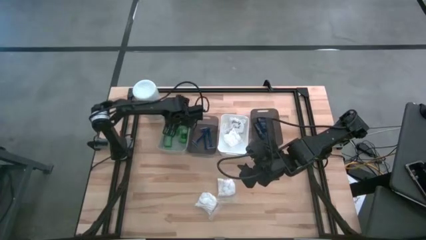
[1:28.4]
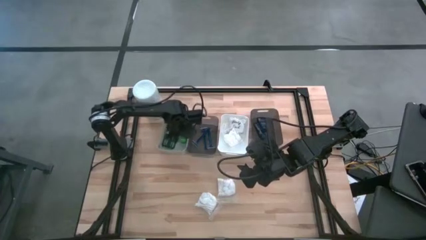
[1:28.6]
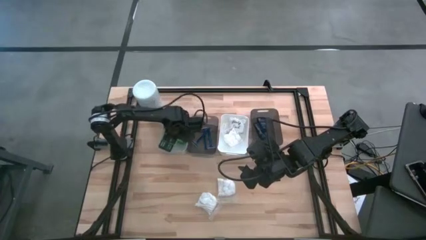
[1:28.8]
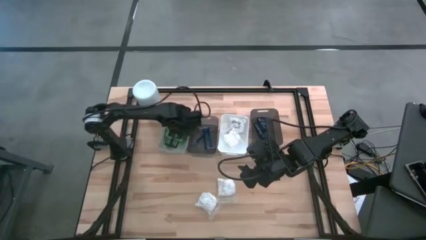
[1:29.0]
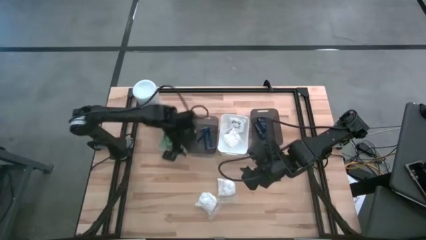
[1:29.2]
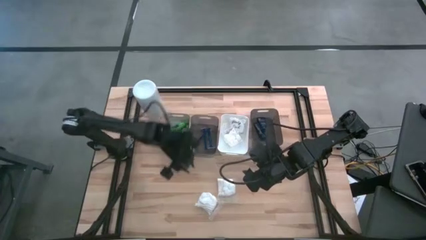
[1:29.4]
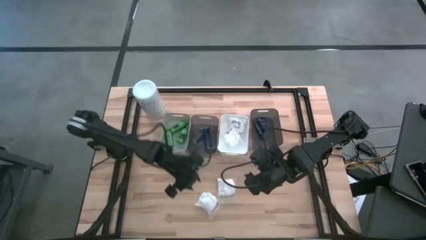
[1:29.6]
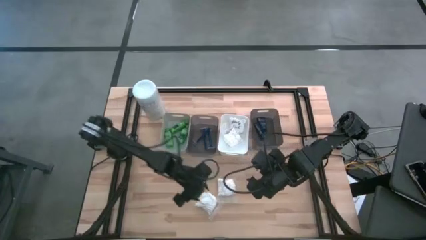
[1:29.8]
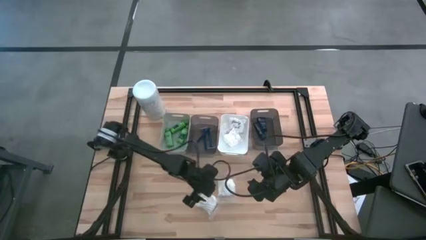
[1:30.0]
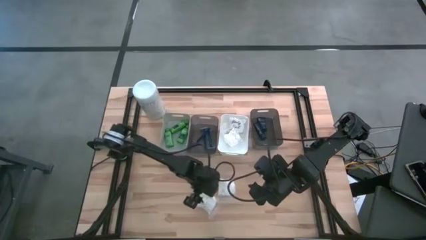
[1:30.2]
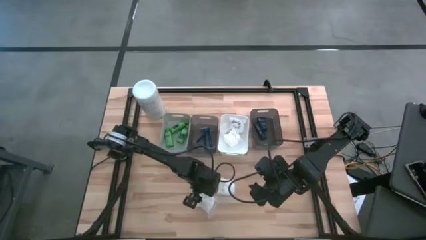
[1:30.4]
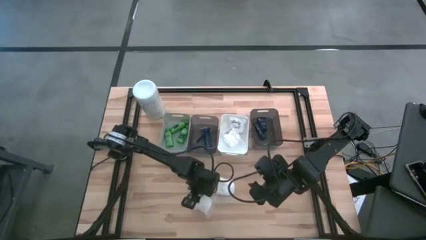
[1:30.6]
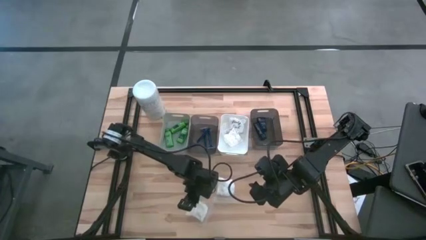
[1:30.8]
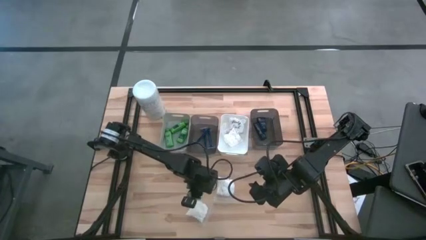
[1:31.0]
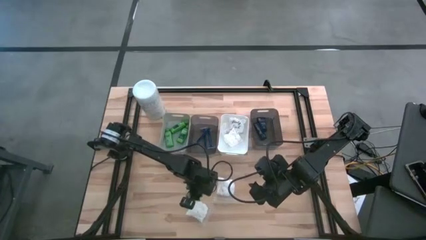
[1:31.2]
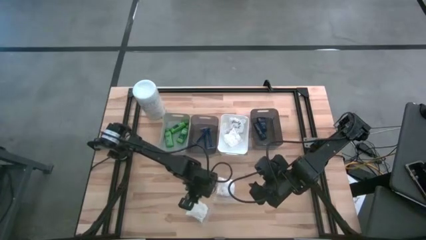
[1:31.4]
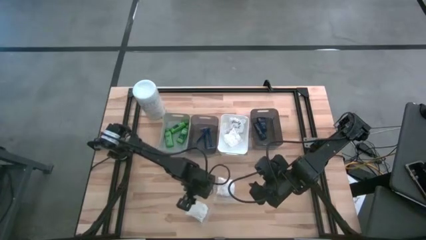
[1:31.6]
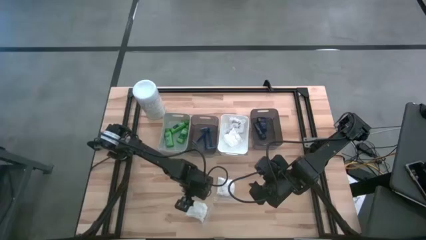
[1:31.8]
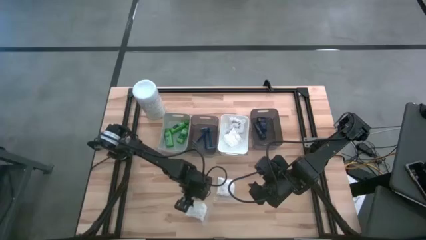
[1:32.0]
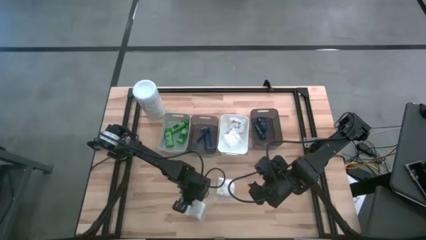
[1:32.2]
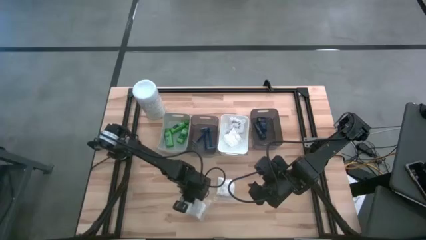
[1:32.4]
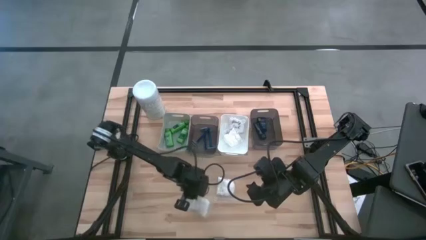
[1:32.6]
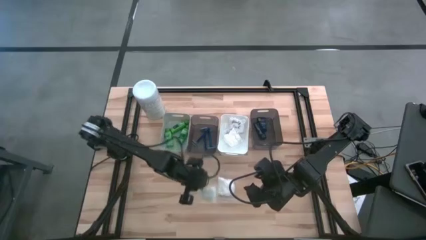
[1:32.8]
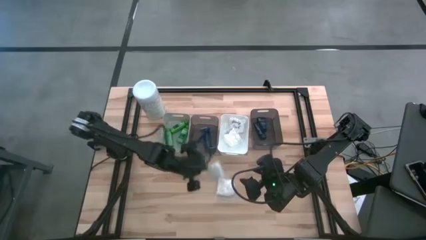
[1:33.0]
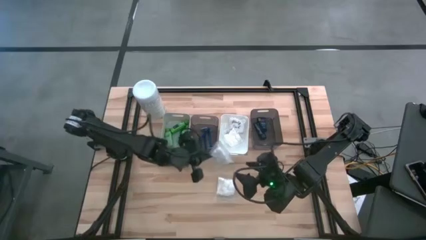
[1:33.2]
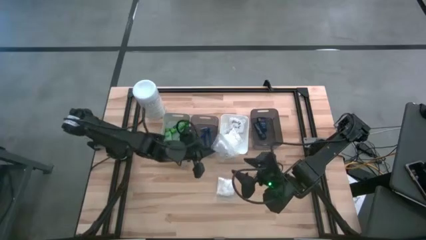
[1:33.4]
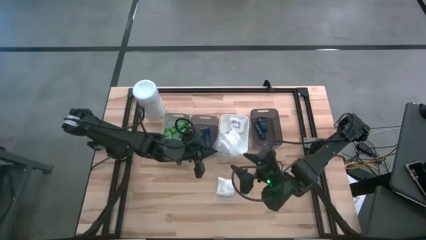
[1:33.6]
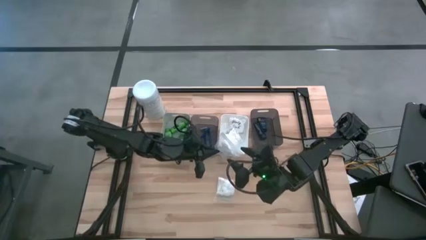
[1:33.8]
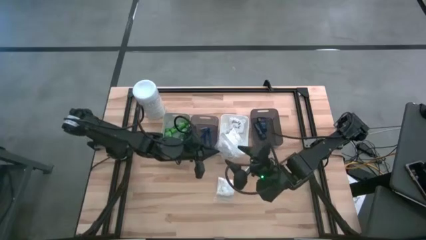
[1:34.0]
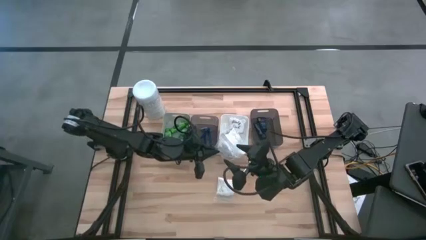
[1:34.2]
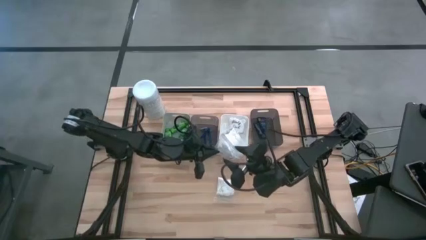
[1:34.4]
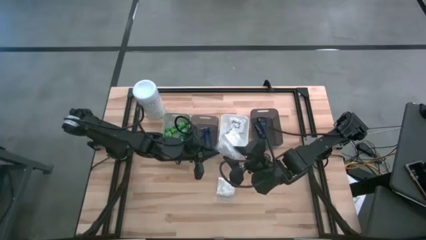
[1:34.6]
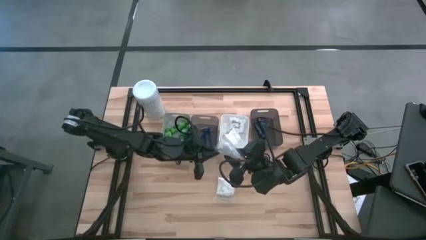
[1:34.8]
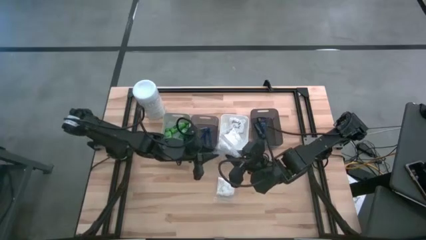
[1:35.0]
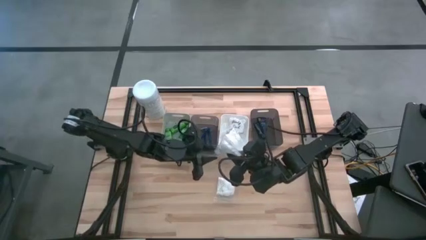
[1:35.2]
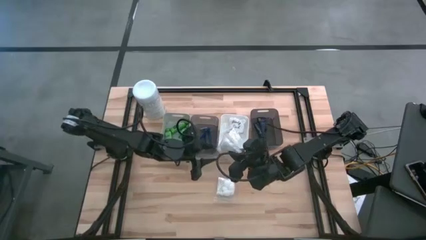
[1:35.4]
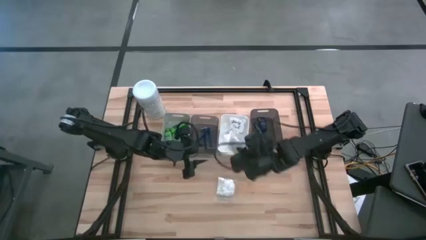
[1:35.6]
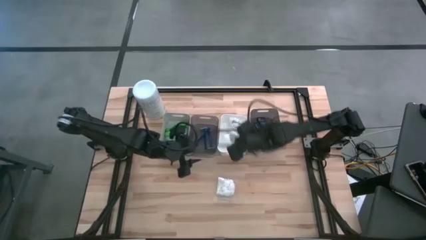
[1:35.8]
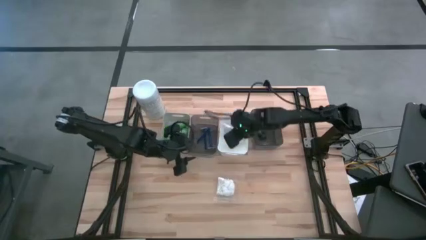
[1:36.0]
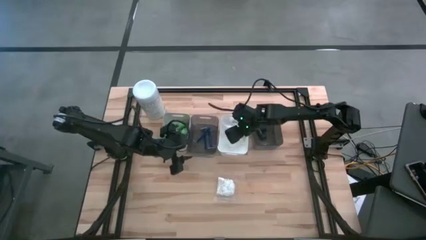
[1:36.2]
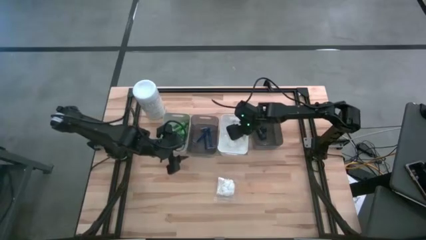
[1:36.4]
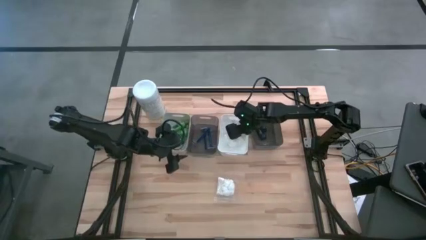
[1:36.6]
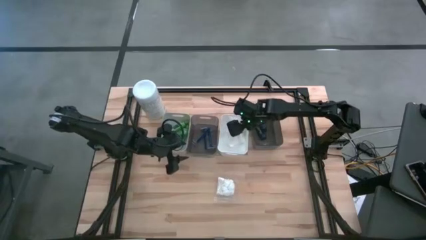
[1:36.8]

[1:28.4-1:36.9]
Task: Pick & Place Travel size toiletries
Put the white cotton pack into the white bin

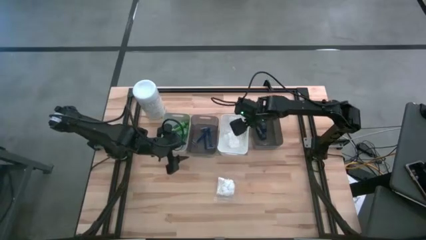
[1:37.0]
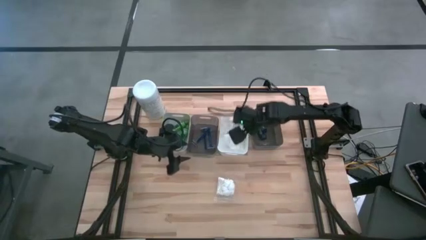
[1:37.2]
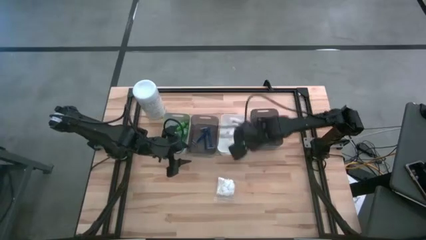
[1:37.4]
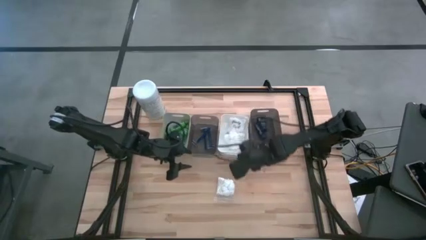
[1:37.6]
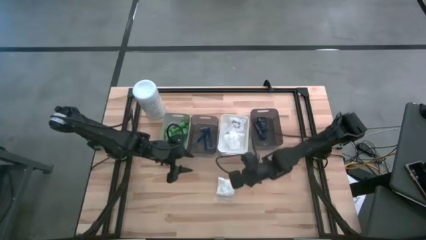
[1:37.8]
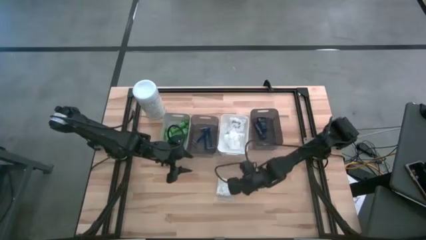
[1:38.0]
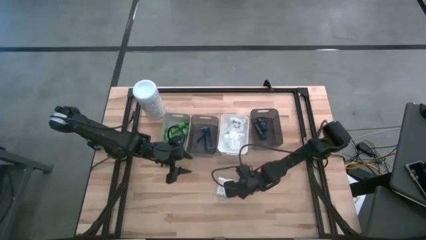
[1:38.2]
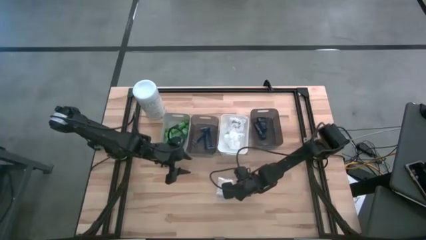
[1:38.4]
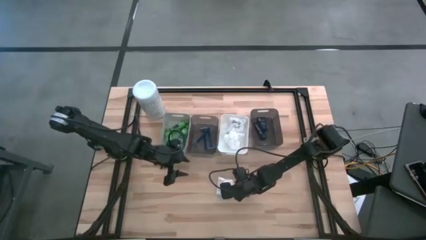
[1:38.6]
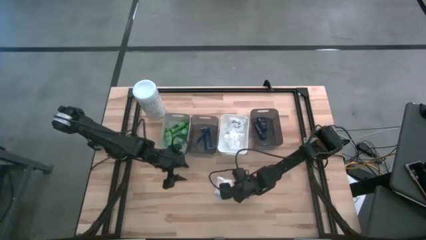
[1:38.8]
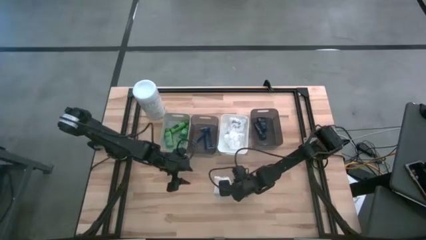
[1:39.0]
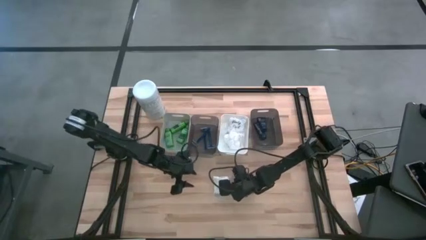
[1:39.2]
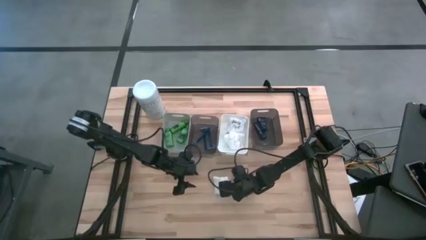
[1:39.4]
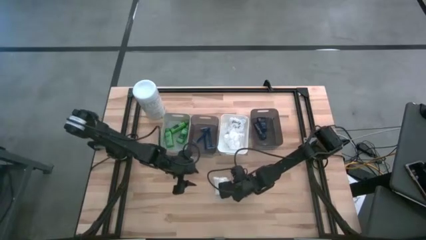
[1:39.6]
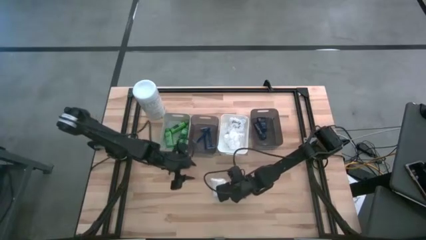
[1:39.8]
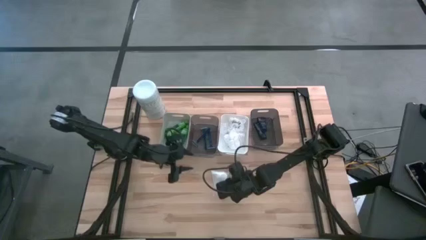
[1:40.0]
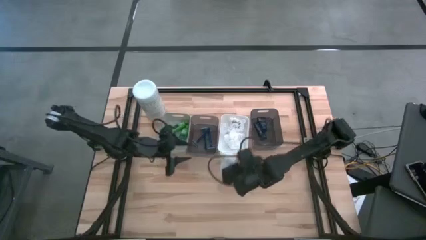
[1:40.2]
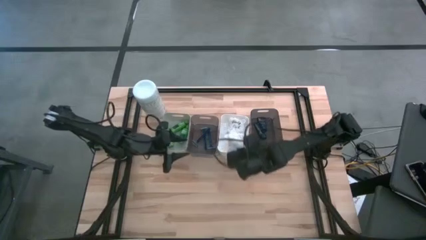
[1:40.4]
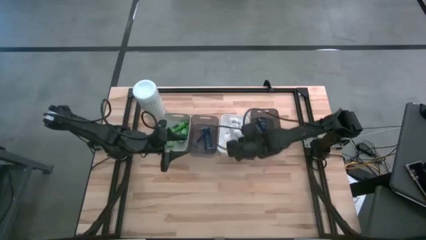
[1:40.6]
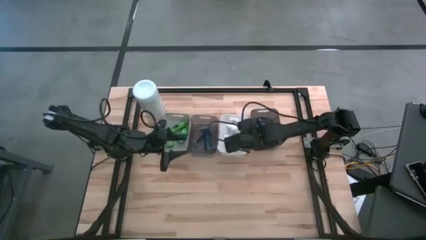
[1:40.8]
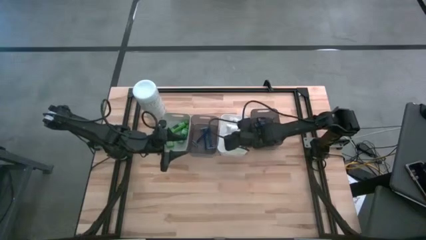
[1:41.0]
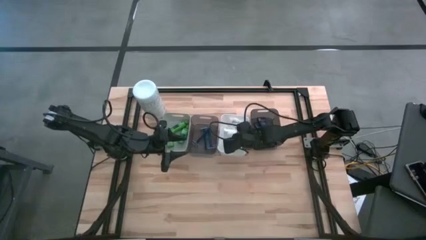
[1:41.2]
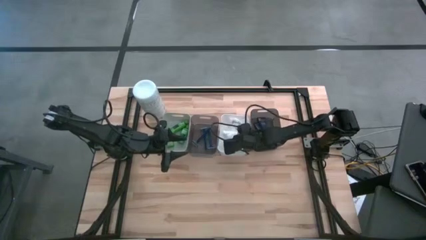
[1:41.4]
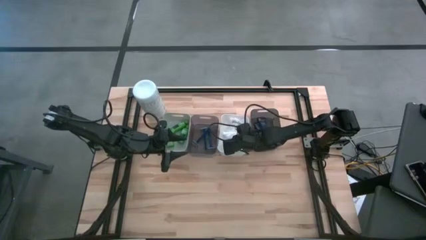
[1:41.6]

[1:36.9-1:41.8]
Put the white cotton pack into the white bin

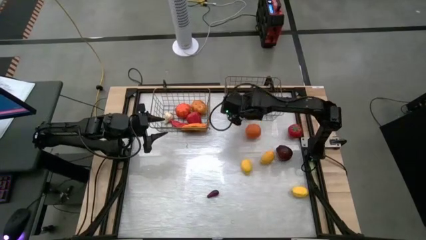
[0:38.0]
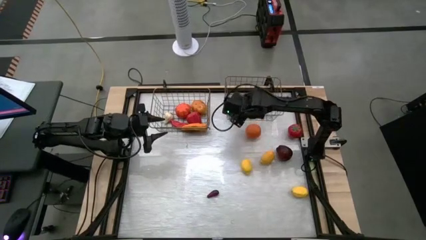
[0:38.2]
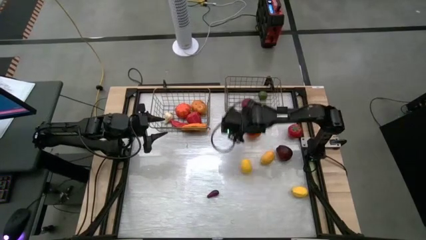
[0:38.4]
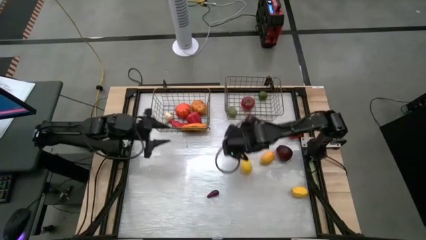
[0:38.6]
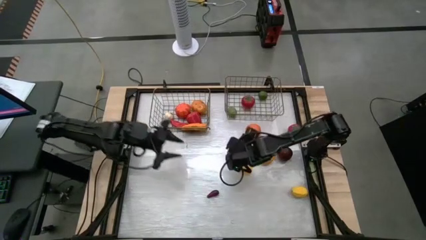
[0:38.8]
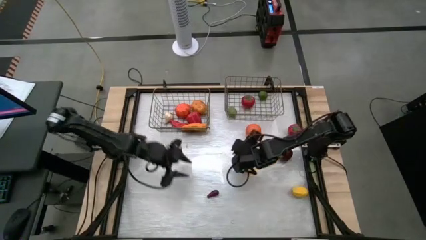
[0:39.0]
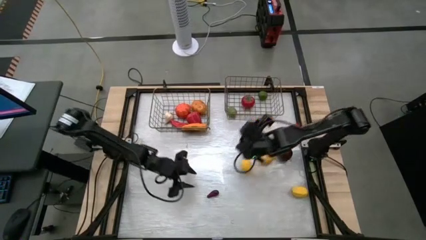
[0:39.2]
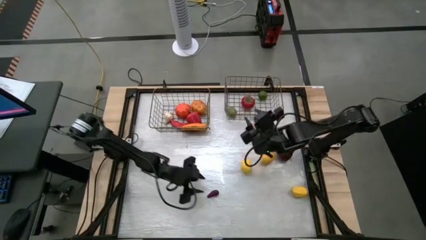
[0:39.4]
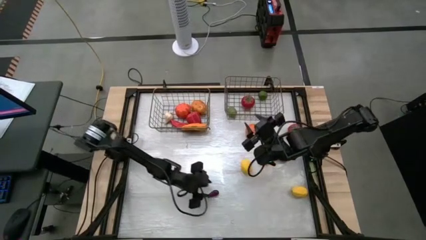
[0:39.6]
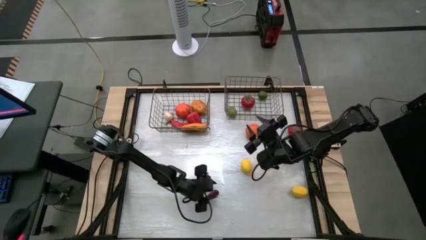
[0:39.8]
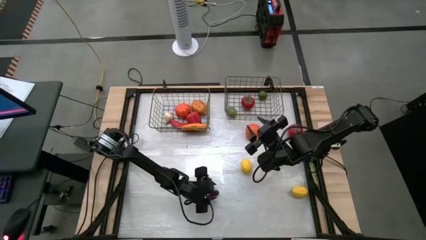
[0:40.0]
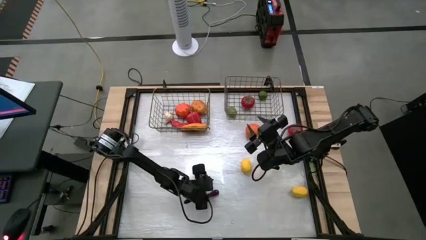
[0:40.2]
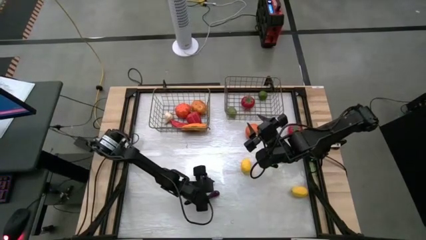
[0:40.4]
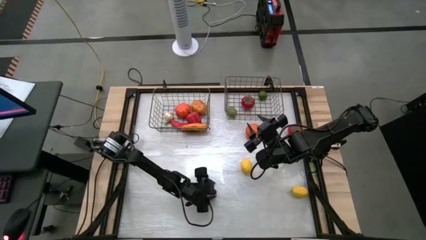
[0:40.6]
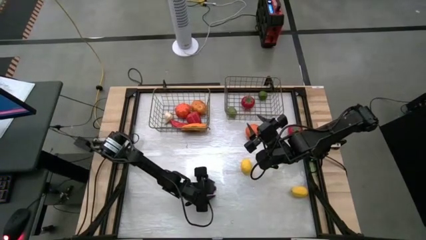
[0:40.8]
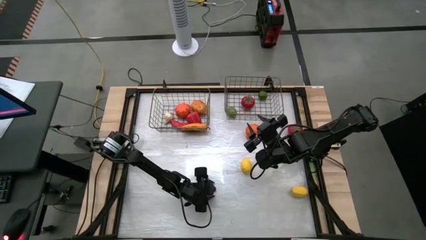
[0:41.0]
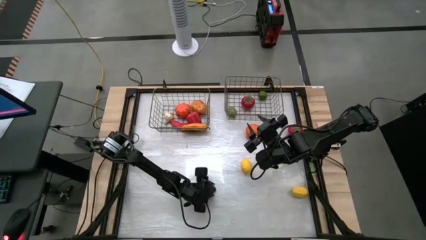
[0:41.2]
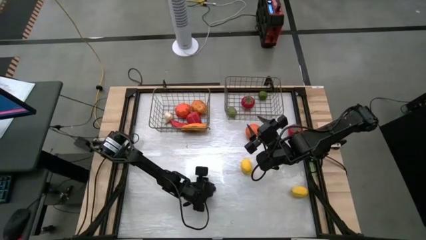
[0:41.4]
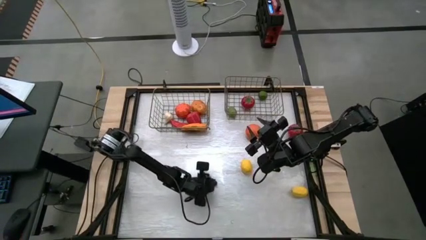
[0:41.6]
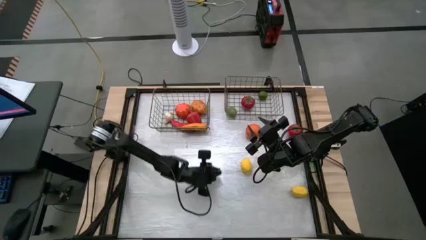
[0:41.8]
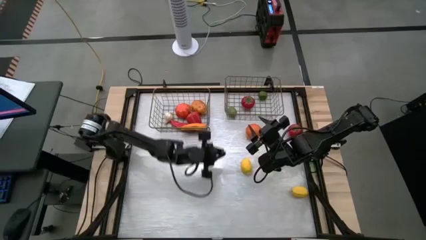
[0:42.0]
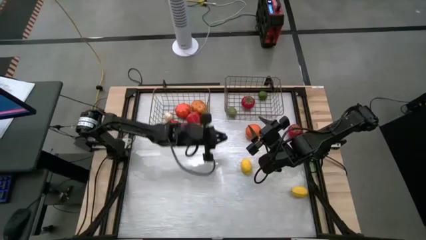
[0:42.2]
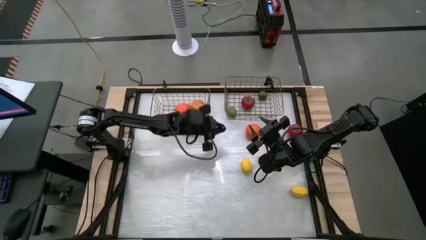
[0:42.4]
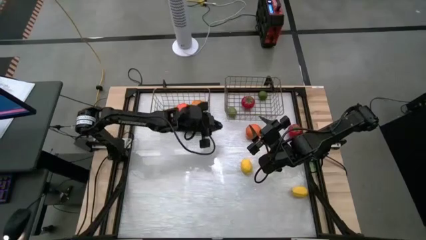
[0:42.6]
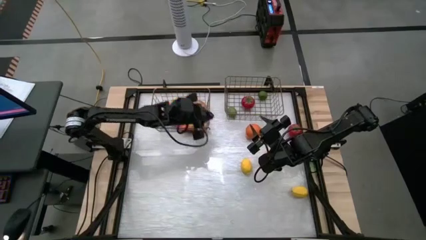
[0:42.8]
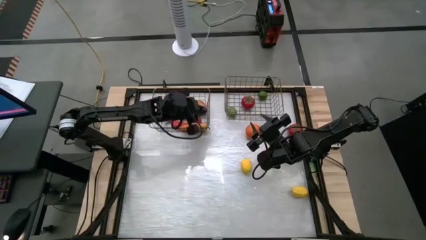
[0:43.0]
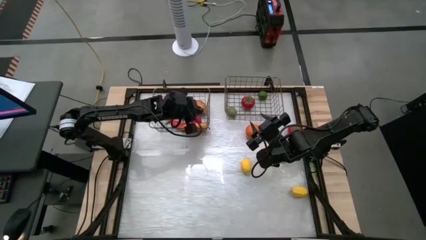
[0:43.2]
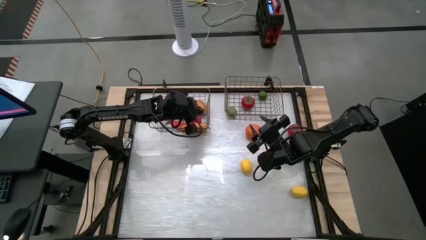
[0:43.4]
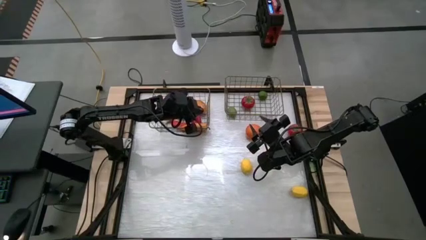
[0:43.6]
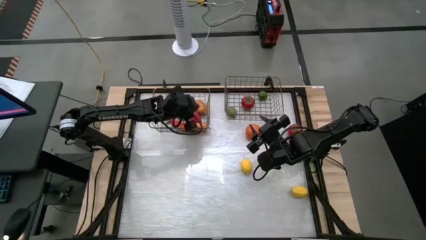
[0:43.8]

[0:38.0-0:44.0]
Task: Sort produce into baskets
Put the eggplant into the left gold wire basket
